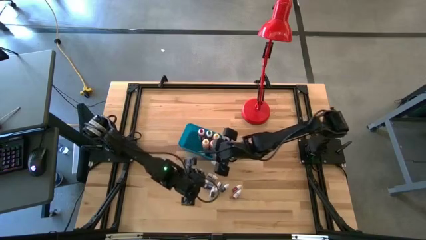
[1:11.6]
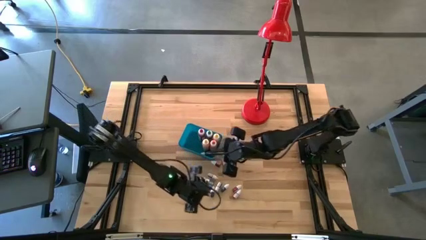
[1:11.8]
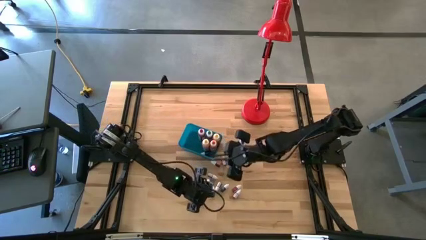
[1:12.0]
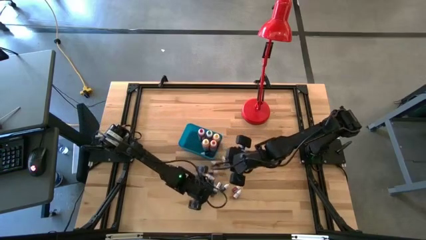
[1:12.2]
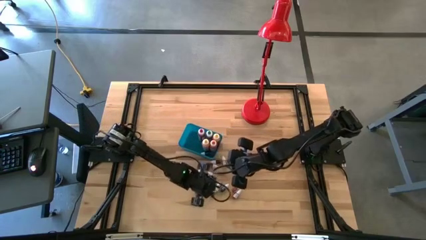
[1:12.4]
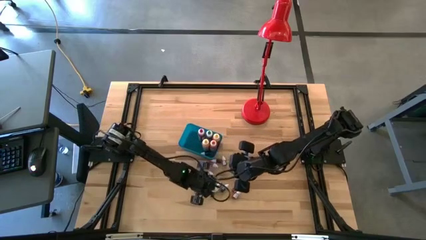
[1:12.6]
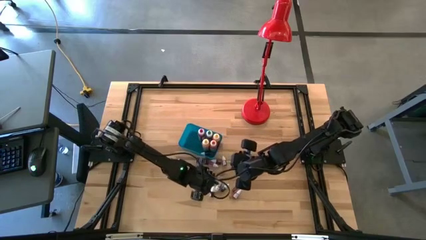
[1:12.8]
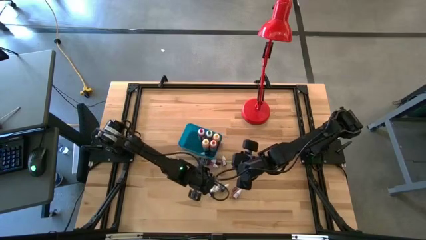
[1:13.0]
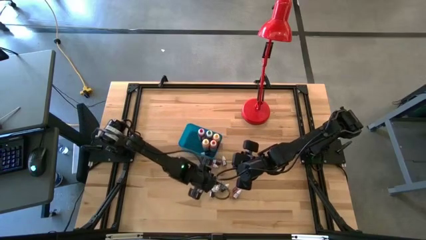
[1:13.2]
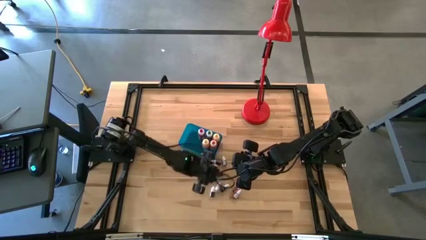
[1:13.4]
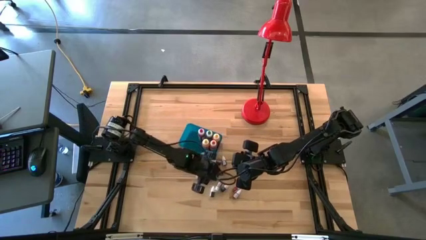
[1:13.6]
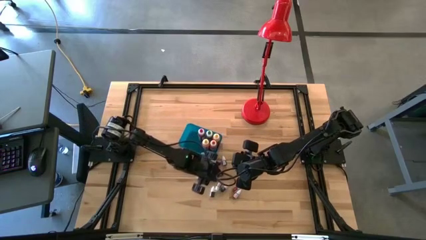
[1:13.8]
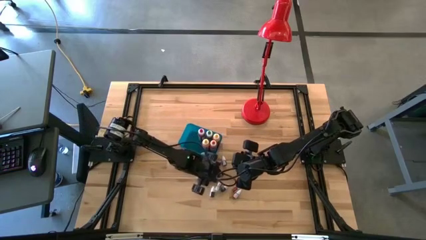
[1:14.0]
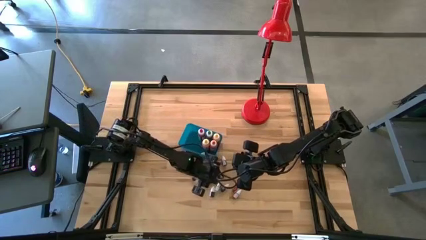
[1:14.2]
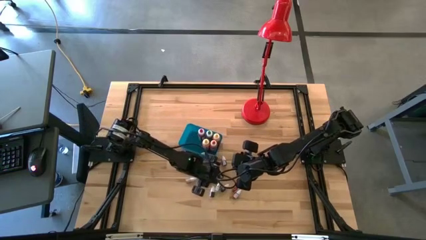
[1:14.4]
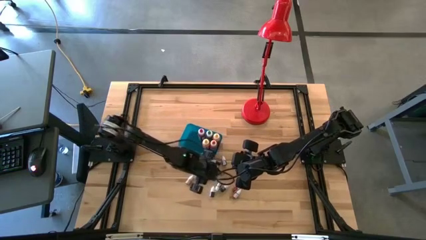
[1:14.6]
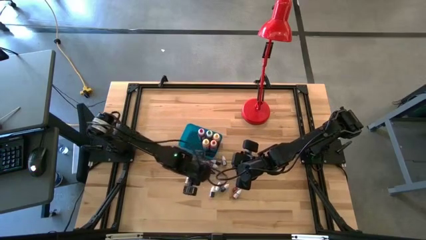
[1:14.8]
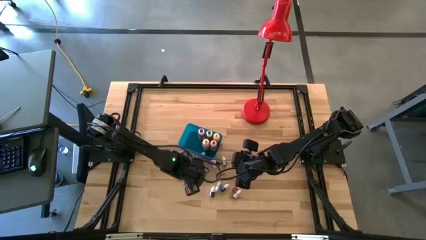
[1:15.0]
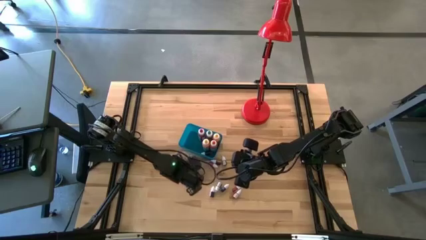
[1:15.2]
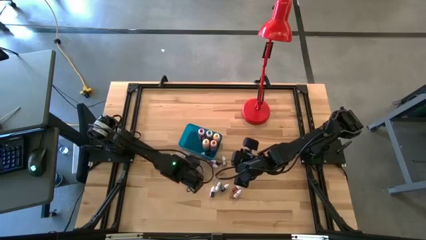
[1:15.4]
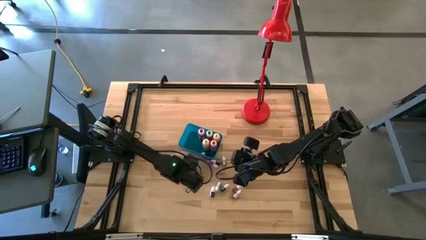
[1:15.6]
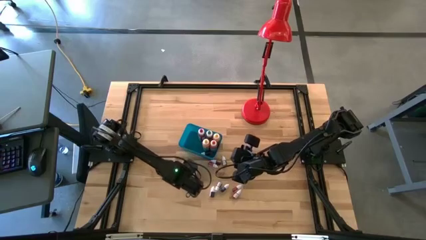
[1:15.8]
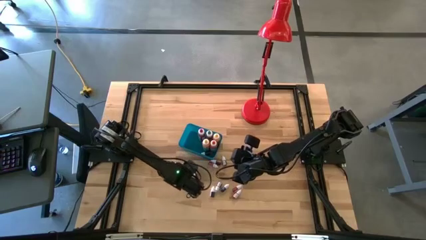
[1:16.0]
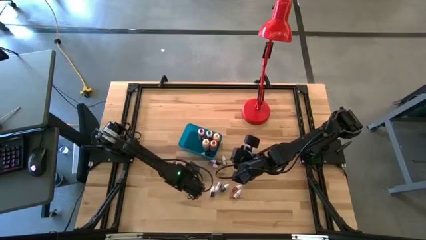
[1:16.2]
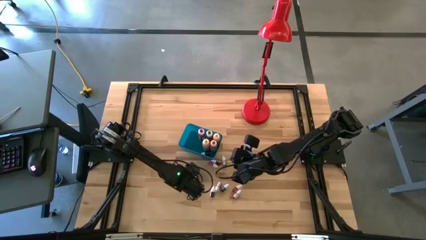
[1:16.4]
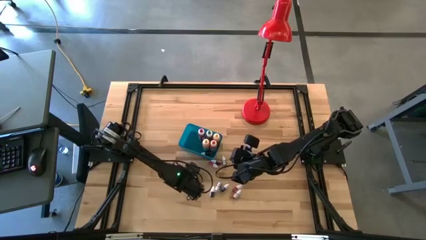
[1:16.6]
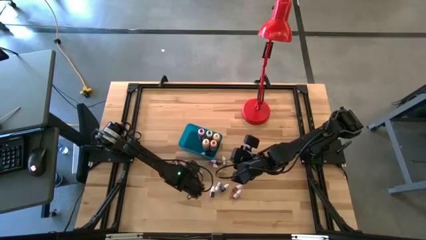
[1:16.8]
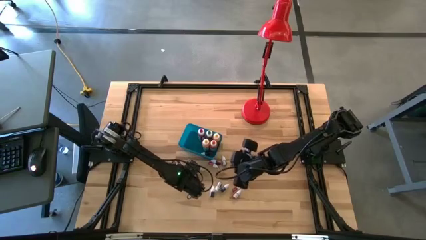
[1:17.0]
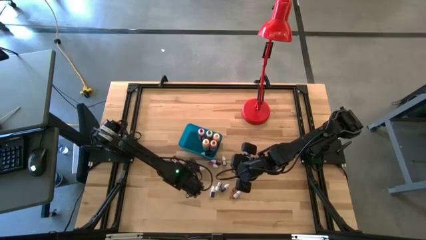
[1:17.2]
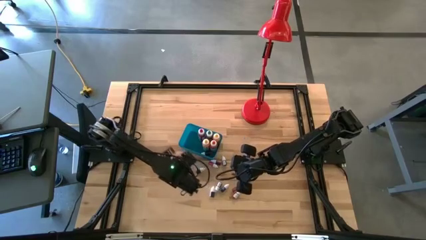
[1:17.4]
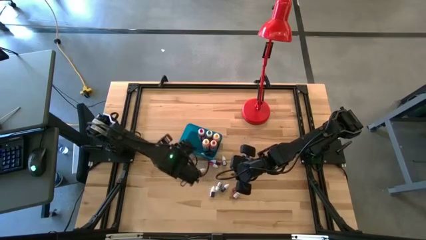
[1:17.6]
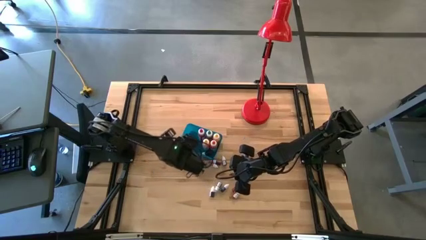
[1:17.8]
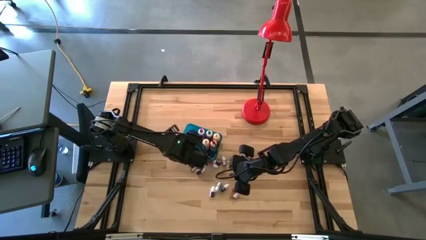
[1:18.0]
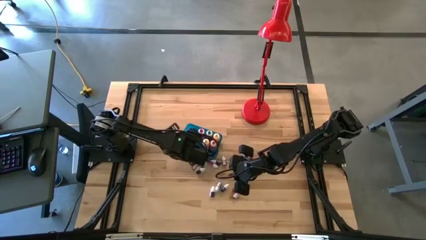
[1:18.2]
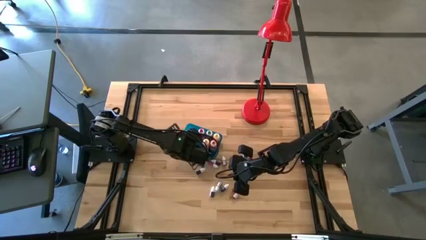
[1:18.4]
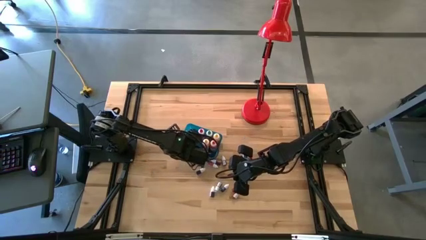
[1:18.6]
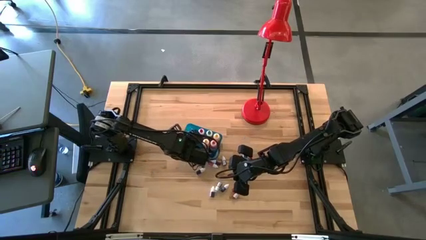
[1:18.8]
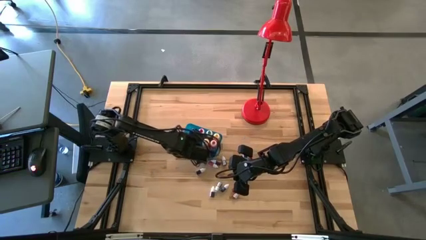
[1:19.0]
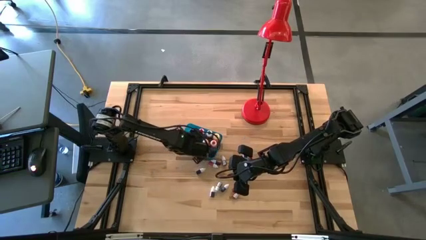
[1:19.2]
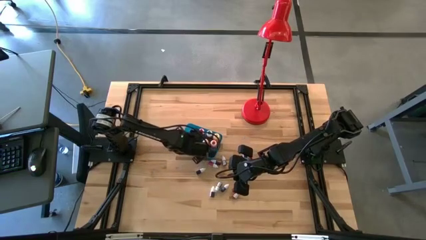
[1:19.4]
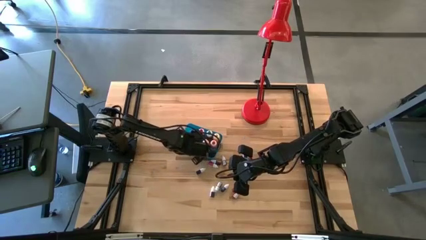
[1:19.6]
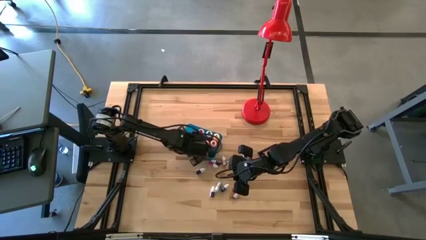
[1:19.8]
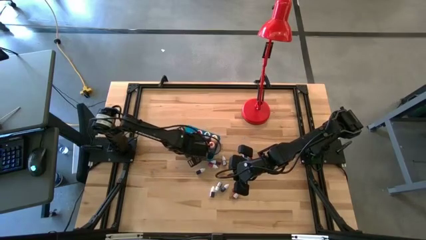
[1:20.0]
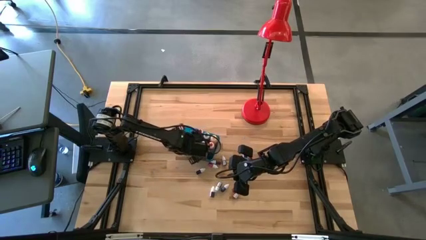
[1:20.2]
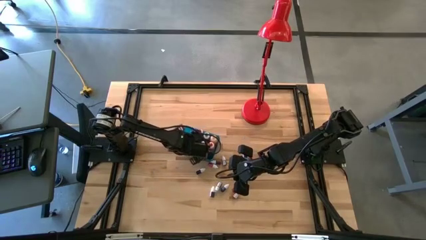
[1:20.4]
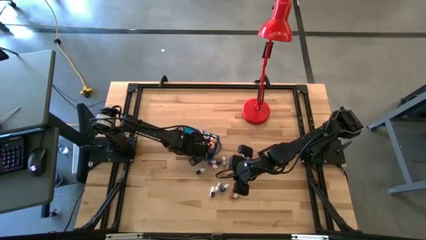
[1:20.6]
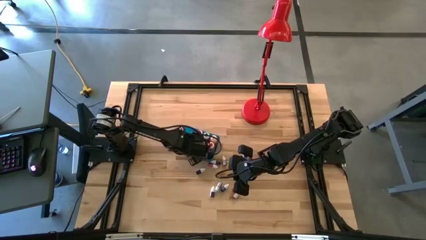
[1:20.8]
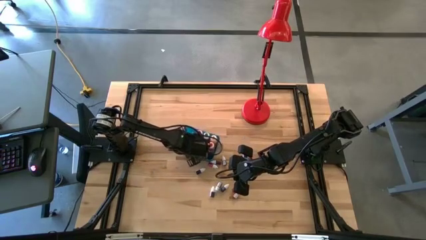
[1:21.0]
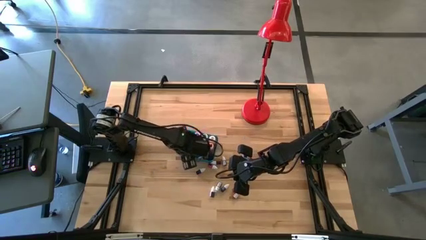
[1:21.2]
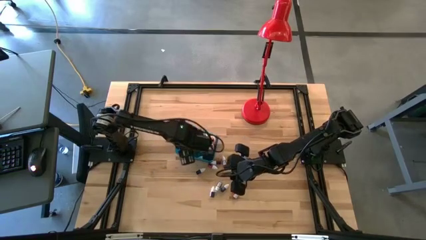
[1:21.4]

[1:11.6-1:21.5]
Task: Pick & Place food coloring
Put the small green food coloring into the blue bin

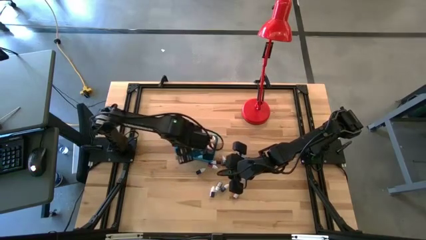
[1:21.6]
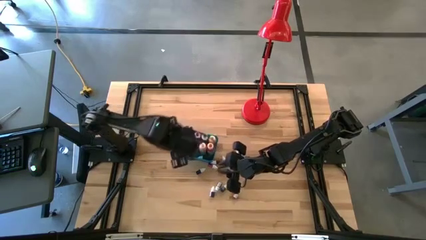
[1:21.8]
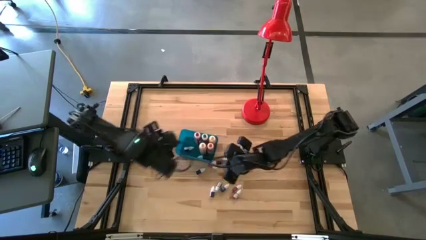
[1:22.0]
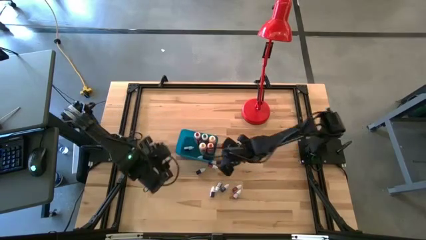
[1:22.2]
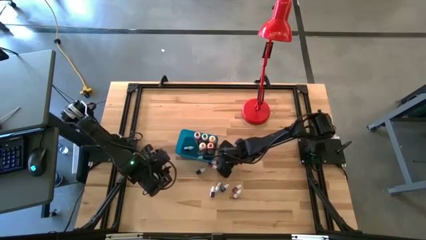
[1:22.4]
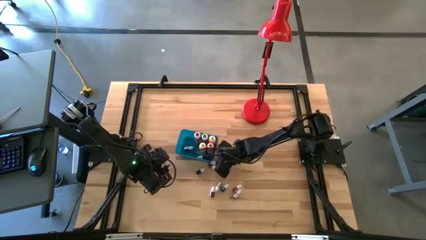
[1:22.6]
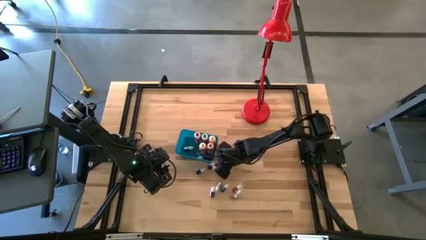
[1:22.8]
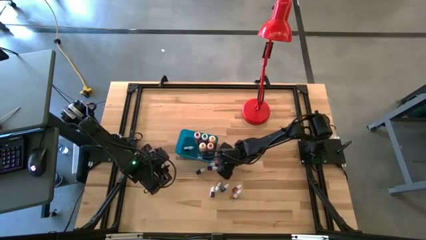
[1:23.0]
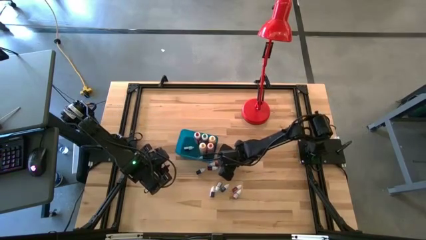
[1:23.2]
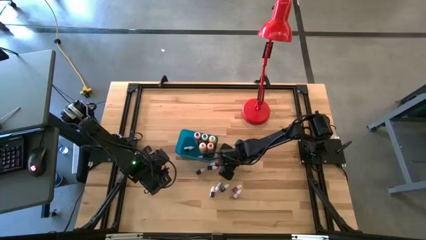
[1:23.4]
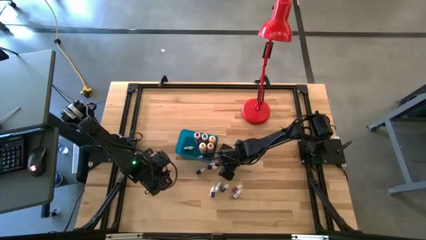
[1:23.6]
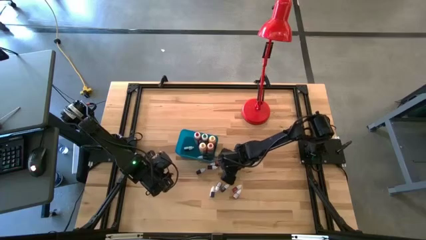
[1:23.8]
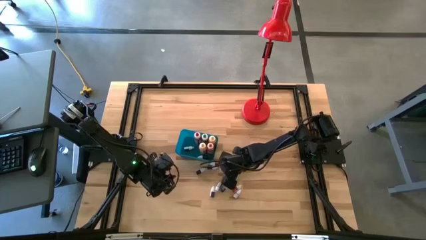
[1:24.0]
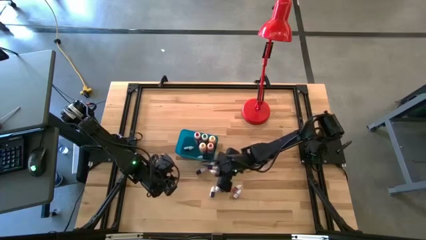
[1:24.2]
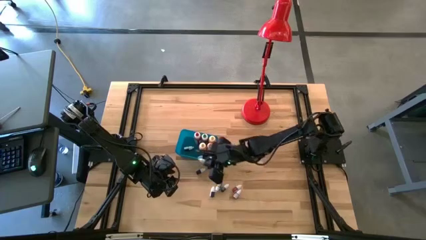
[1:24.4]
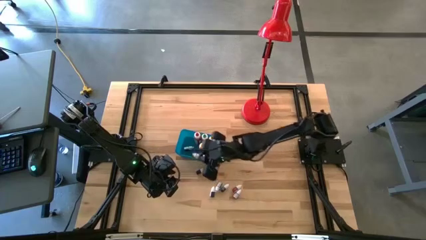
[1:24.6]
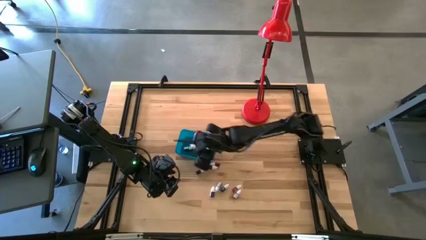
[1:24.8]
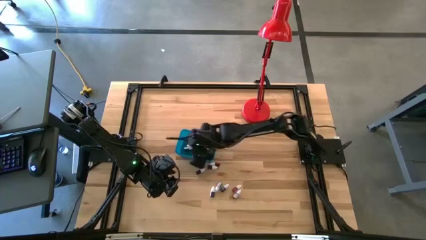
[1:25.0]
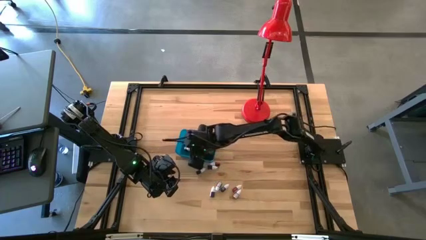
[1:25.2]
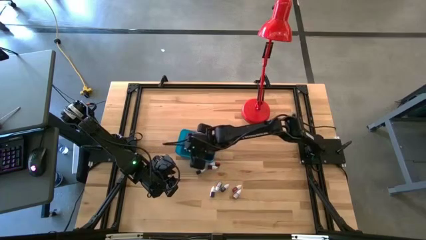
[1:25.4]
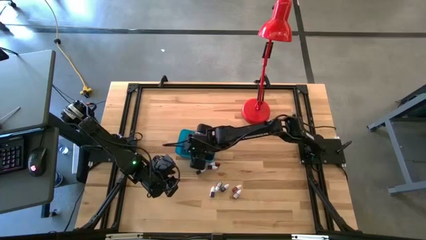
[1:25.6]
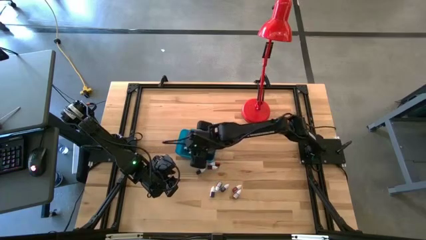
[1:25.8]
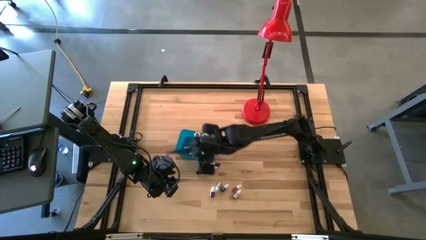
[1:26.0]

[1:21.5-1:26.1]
Put the small green food coloring into the blue bin

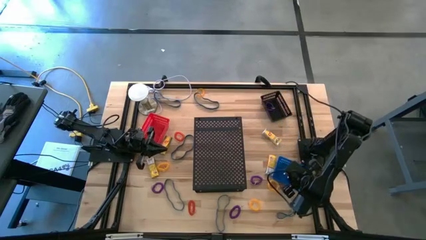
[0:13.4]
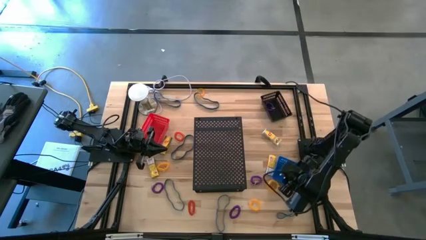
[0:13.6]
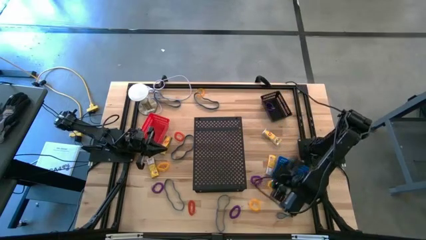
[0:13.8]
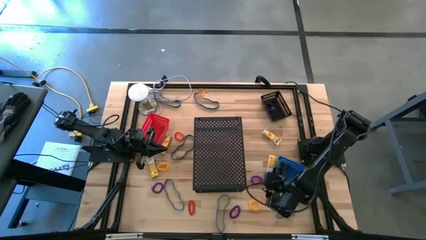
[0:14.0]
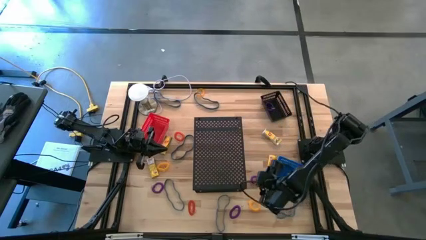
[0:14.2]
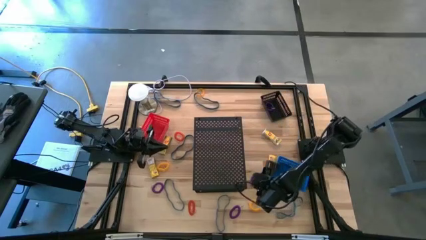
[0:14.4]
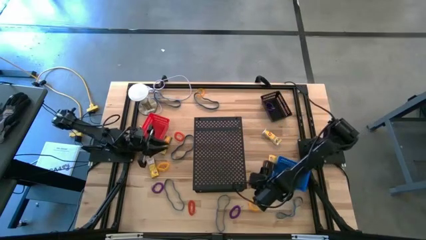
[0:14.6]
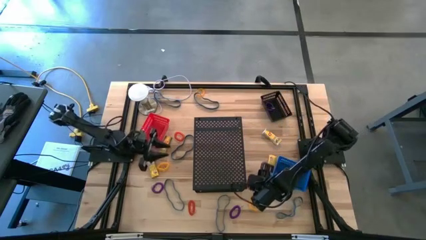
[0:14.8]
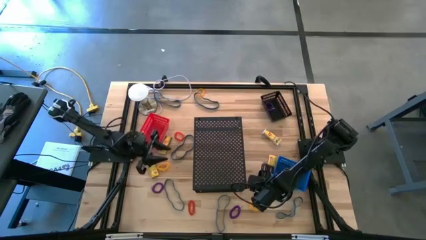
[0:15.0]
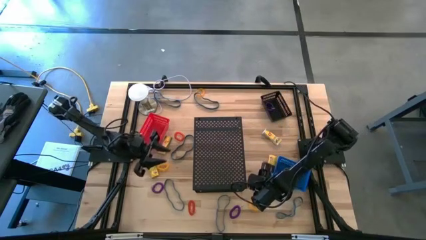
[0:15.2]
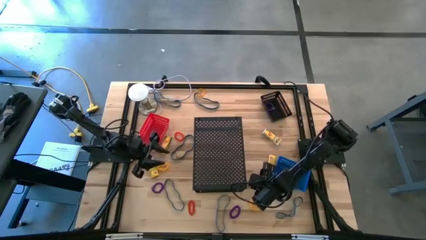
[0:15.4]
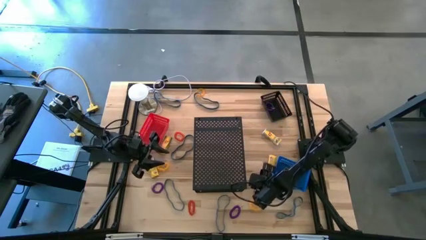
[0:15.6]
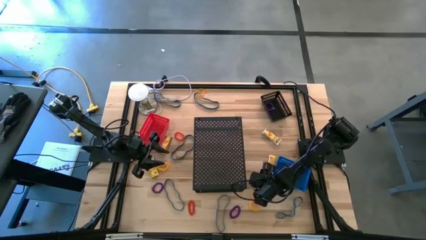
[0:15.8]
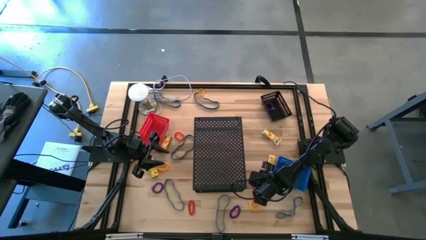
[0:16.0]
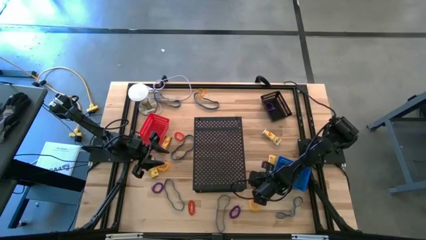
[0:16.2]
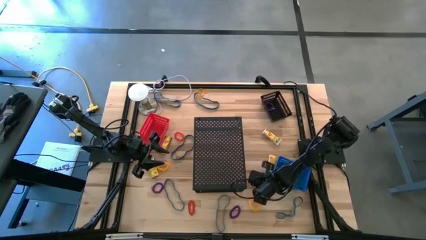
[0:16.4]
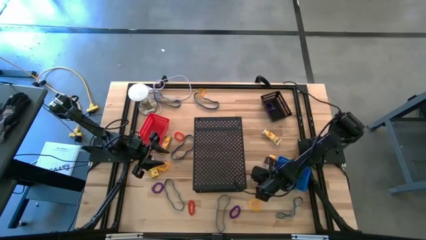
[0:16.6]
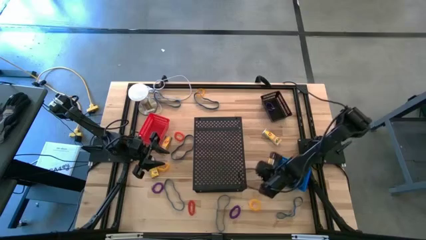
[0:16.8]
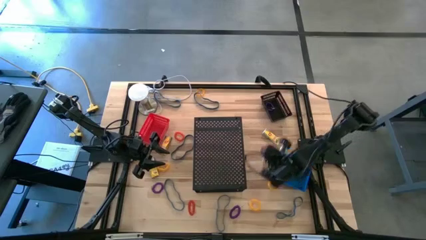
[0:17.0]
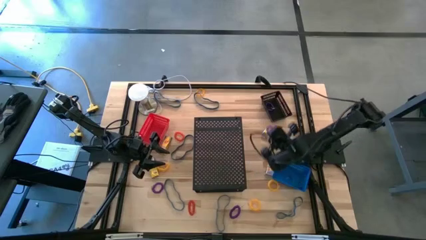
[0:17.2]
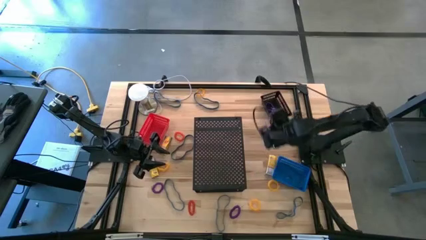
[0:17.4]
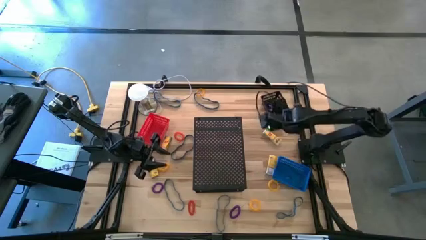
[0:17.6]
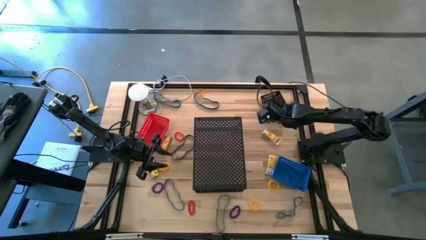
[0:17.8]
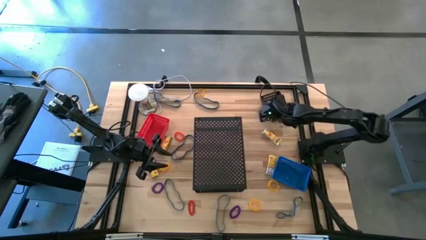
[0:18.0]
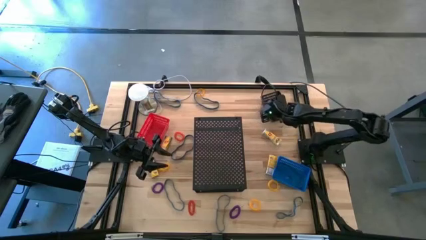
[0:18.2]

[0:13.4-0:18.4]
Task: Pick & Place Office Desk Supplies
Put the violet spring keychain into the black bin
